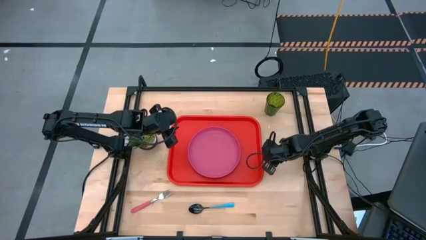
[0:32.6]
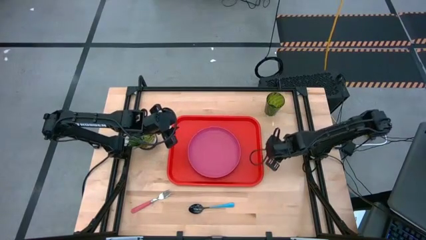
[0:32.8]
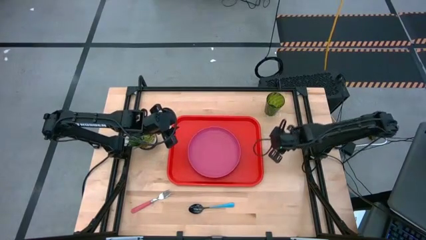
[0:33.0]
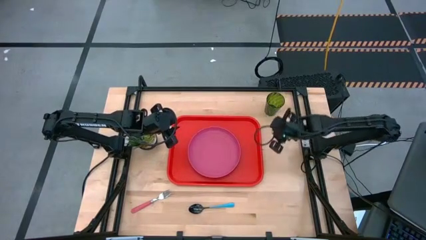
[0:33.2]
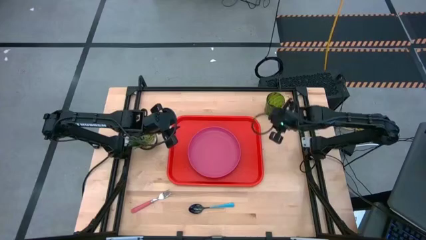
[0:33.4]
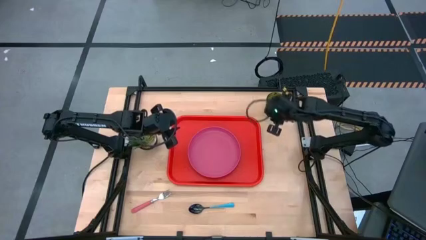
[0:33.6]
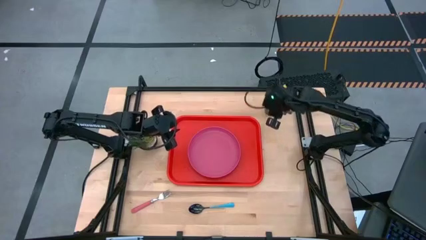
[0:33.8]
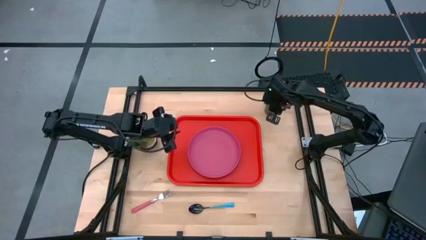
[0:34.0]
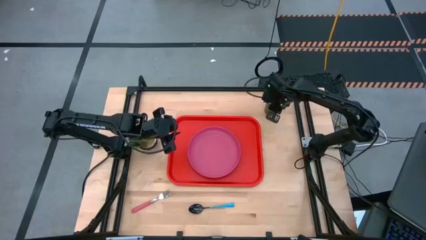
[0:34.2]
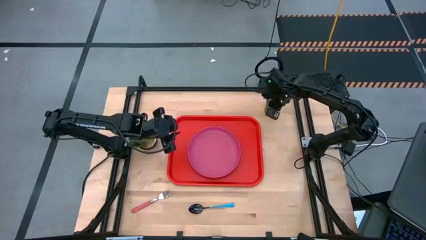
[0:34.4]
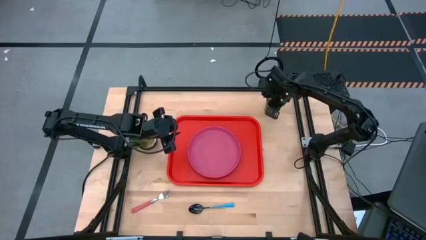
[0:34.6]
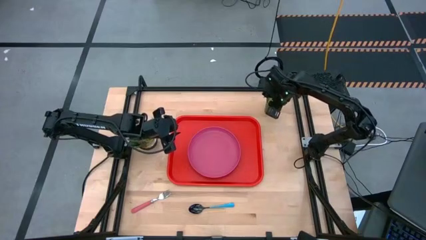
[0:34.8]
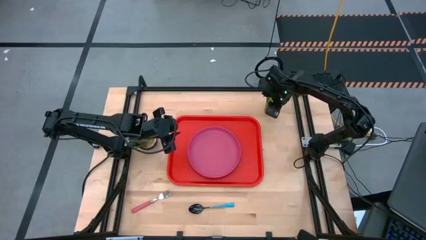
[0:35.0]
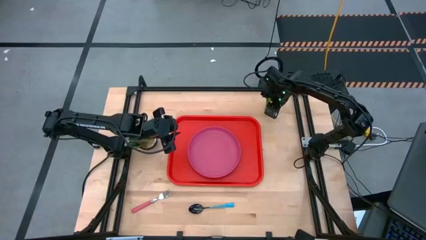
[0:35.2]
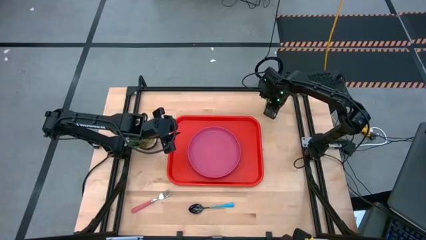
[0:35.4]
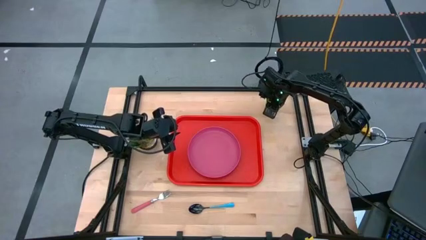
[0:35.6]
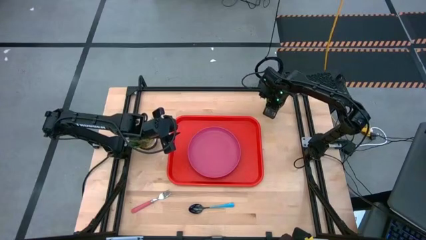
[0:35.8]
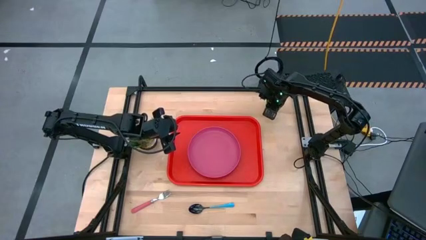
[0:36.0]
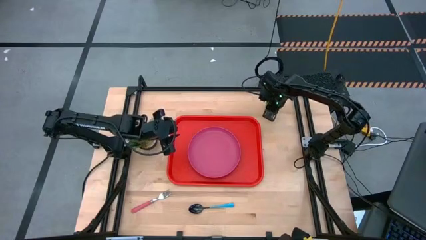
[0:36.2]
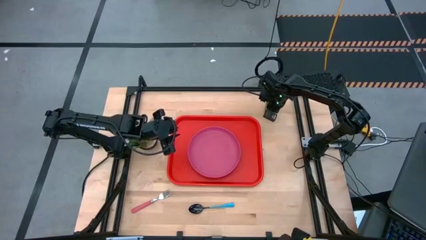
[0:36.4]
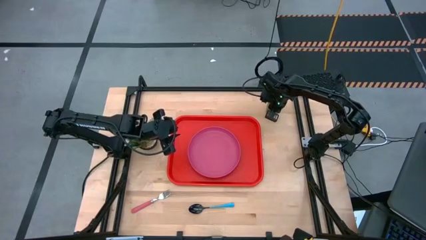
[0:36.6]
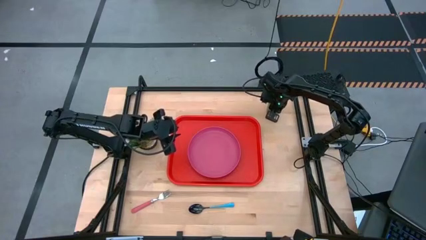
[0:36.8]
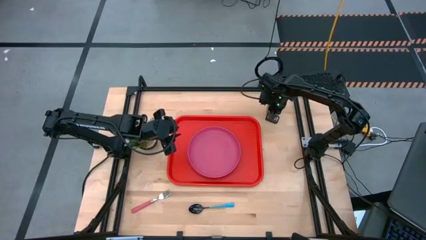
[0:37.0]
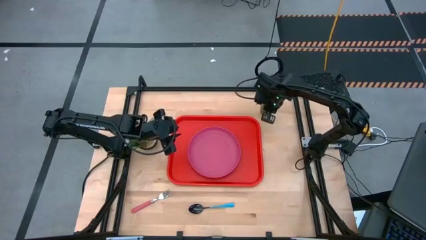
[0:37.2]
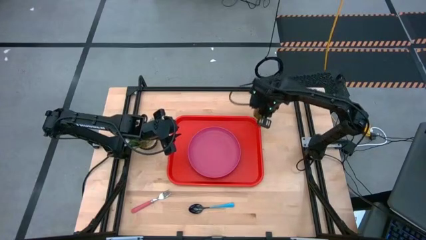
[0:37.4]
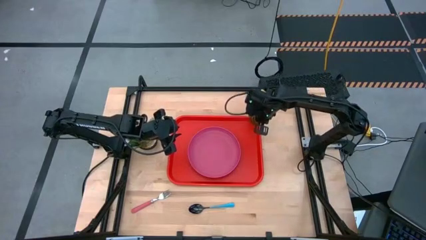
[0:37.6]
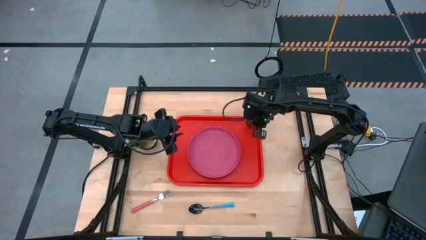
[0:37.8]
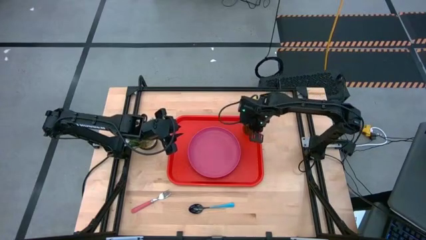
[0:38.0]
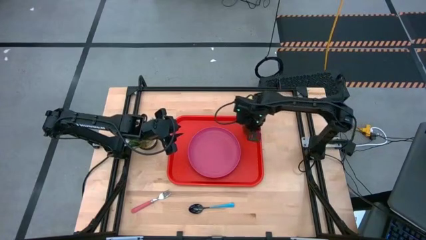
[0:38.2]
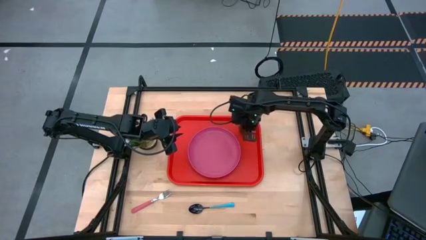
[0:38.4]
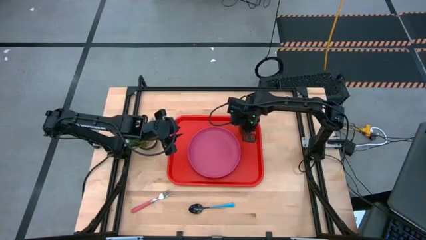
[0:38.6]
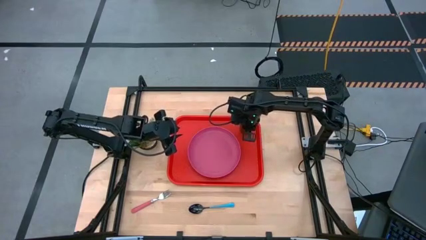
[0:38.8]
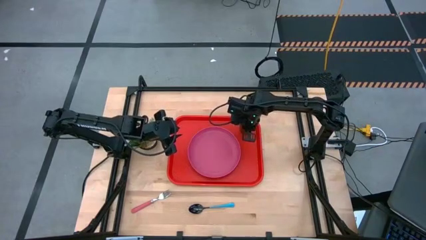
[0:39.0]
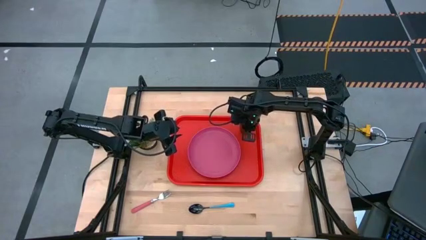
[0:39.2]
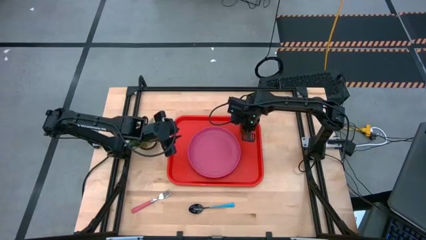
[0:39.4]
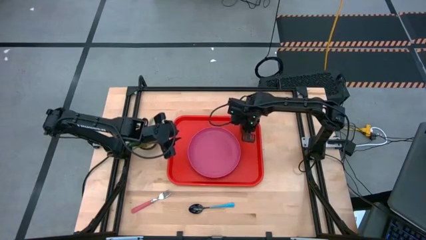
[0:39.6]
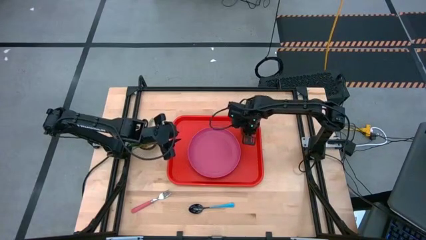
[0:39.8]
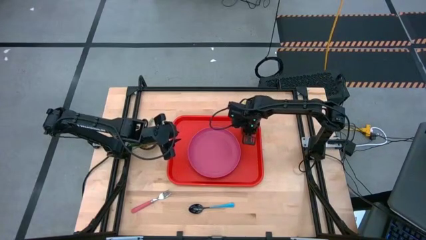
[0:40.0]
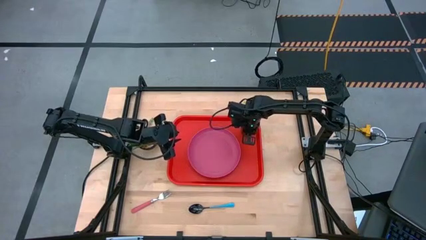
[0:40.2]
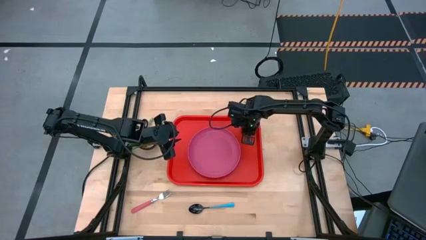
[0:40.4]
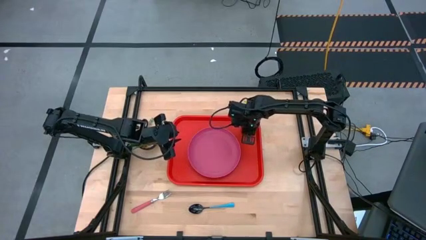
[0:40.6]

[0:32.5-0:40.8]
Task: Pick and place plate/cup/fork/spoon on tray
Put the green glass on the top right of the red tray

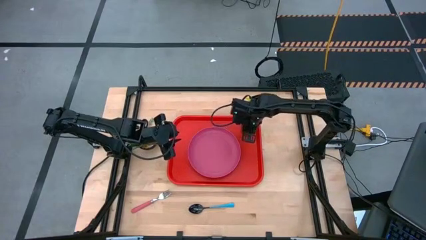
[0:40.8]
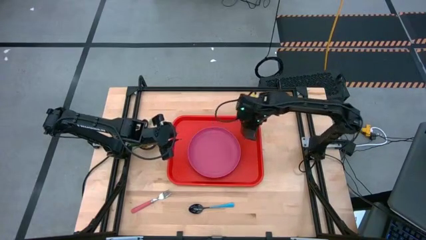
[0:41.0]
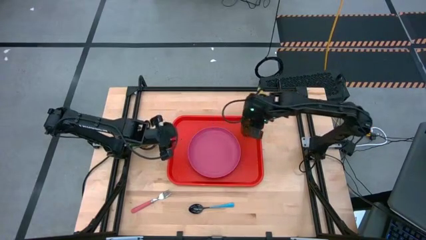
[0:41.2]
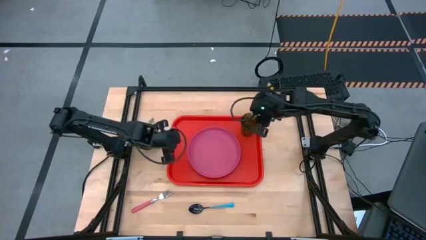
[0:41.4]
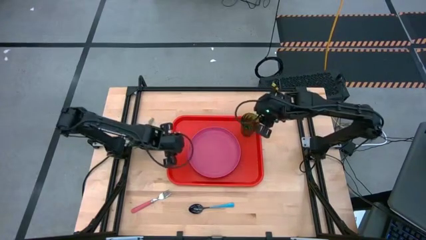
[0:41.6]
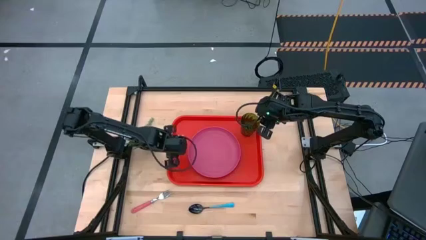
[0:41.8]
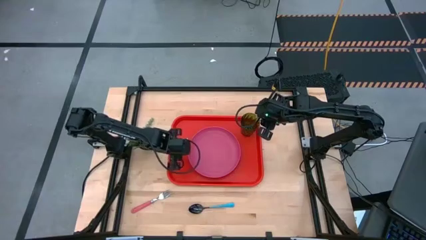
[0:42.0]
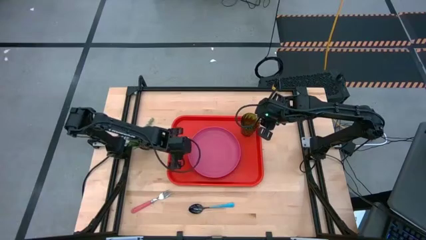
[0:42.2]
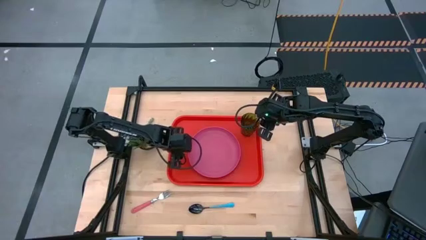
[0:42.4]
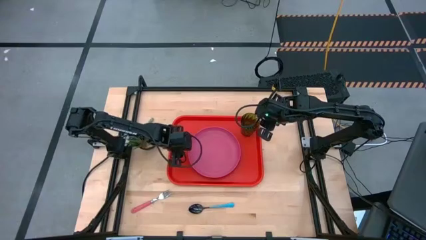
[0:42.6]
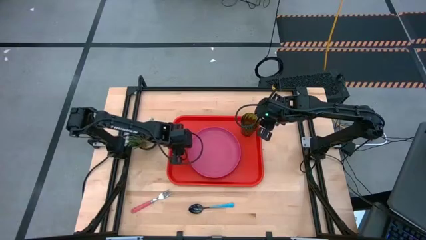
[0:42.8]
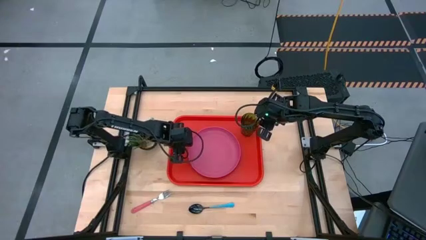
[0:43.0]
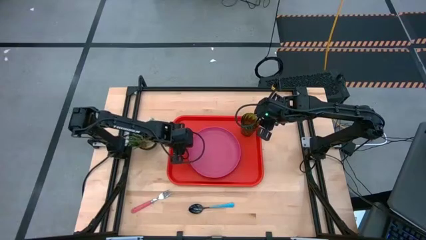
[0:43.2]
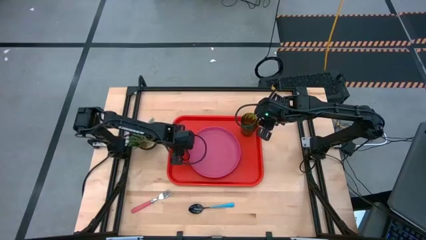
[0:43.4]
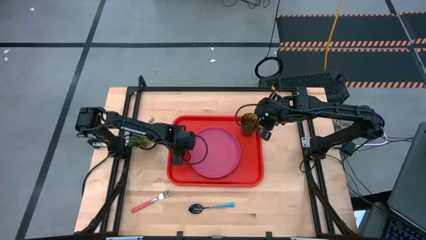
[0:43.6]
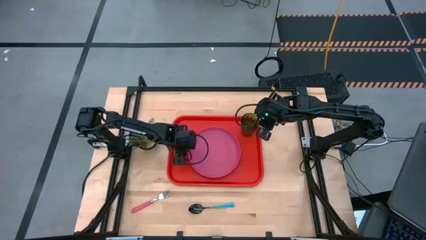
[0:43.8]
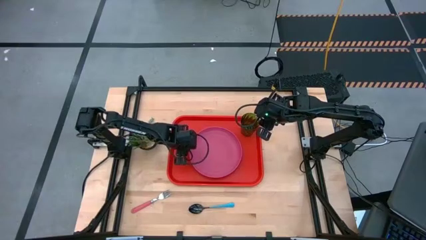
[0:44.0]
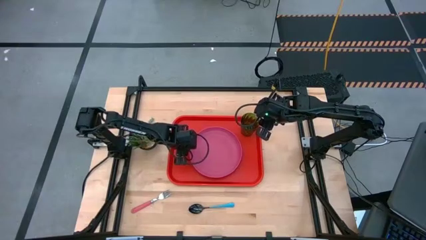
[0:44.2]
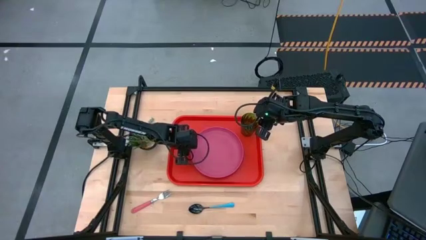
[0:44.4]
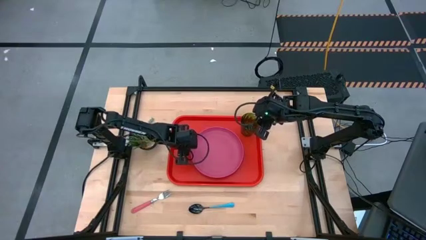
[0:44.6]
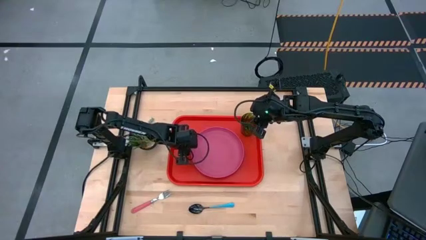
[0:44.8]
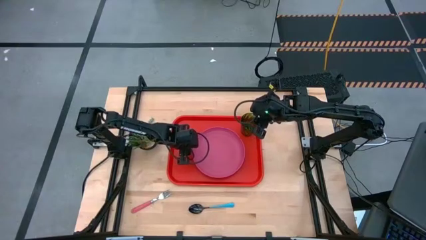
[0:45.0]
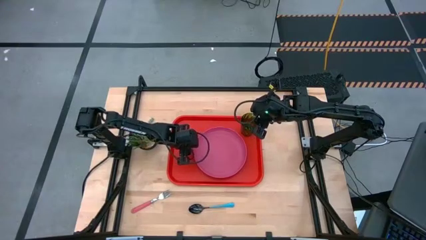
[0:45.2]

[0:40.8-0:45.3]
Adjust the pink plate on the red tray

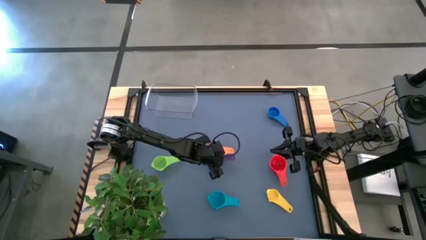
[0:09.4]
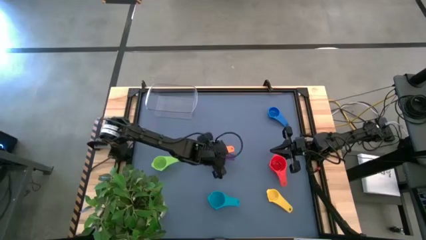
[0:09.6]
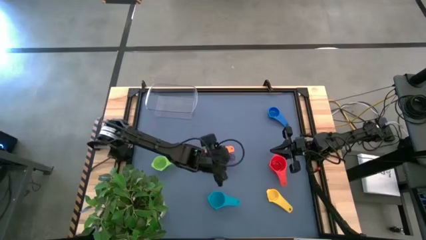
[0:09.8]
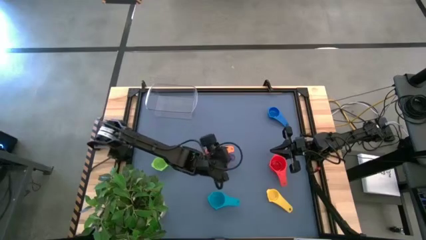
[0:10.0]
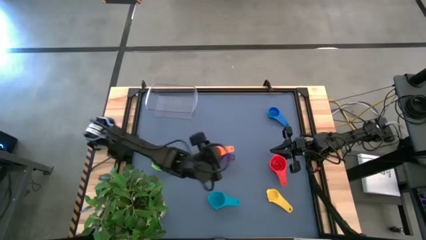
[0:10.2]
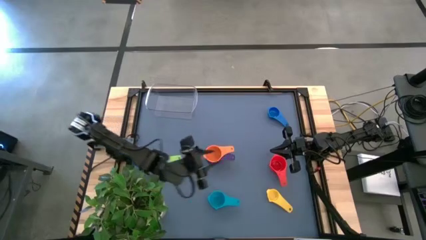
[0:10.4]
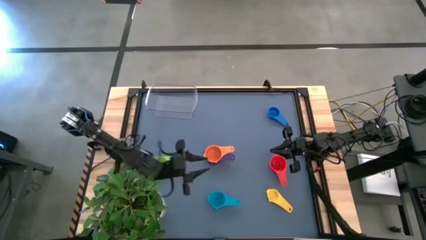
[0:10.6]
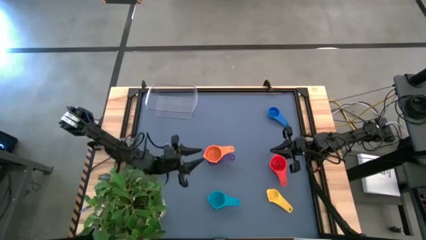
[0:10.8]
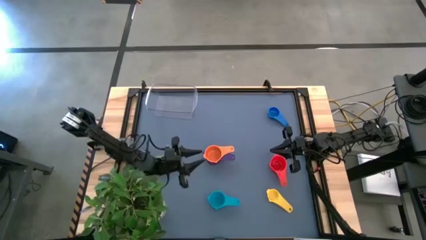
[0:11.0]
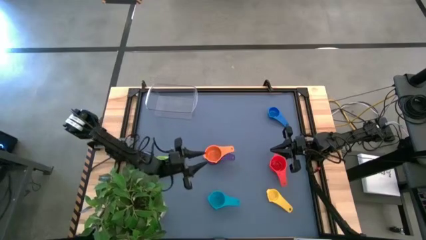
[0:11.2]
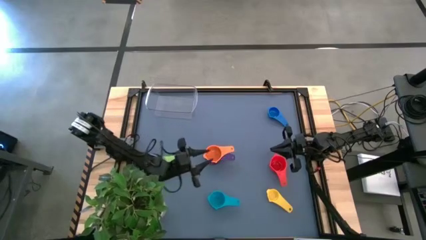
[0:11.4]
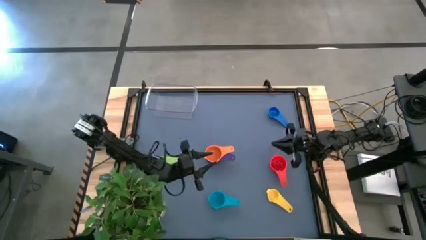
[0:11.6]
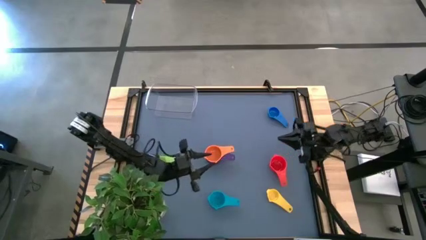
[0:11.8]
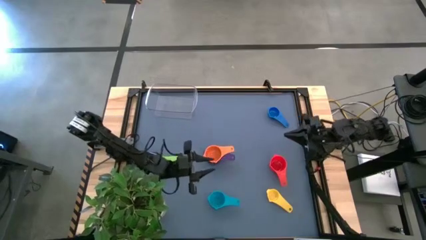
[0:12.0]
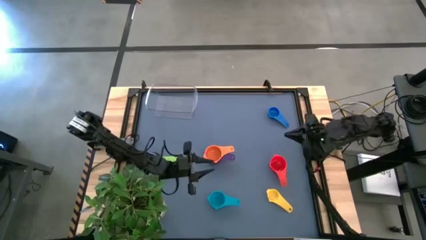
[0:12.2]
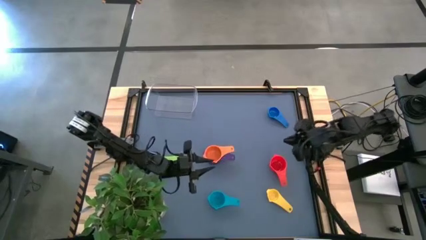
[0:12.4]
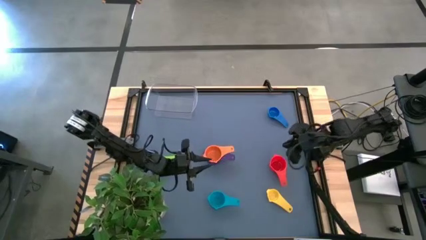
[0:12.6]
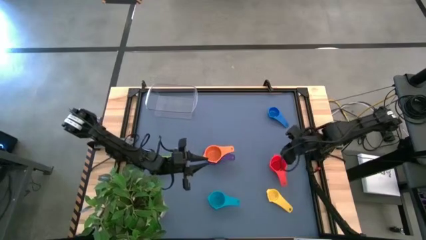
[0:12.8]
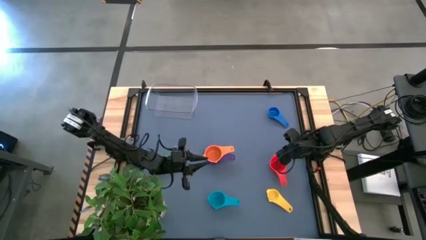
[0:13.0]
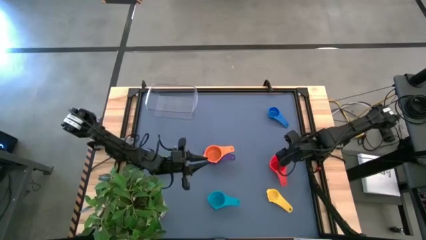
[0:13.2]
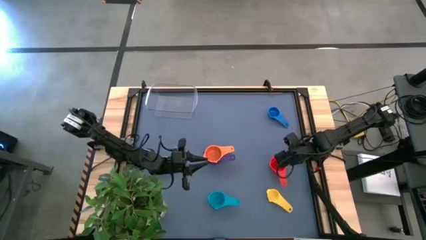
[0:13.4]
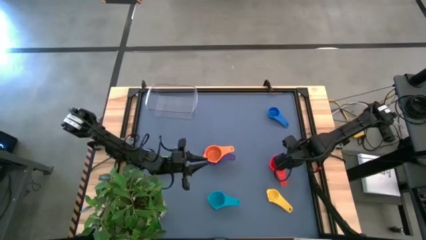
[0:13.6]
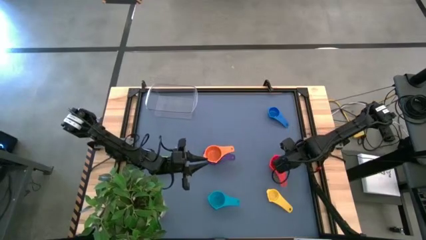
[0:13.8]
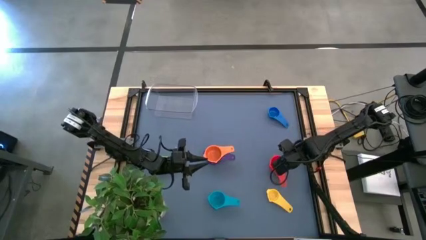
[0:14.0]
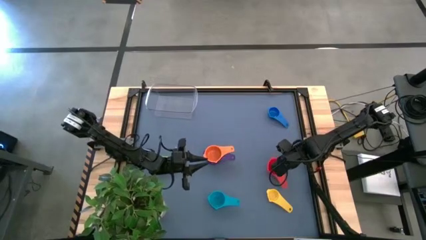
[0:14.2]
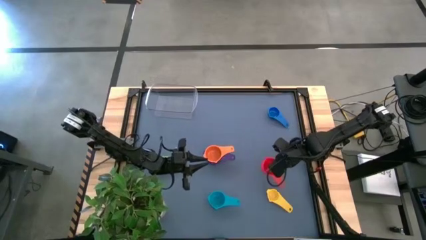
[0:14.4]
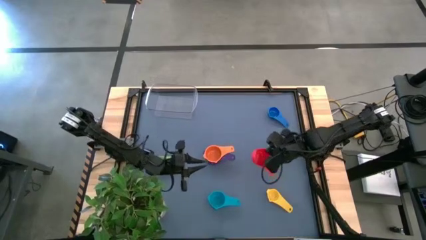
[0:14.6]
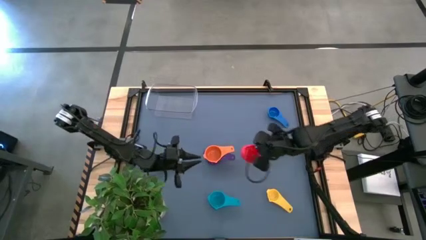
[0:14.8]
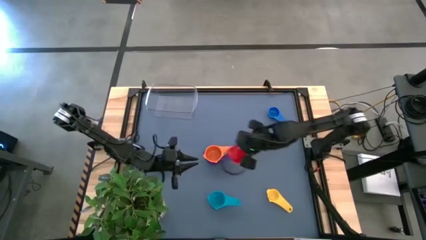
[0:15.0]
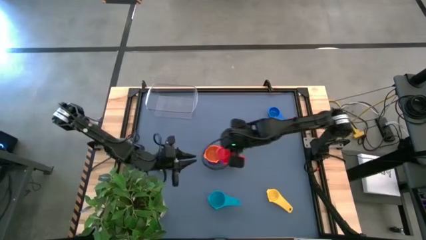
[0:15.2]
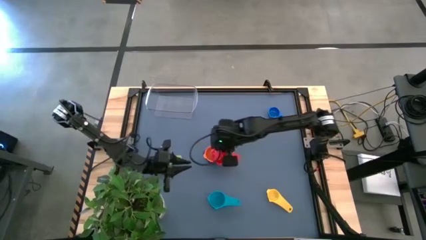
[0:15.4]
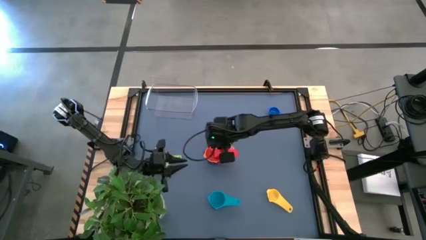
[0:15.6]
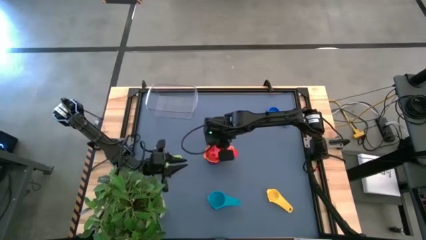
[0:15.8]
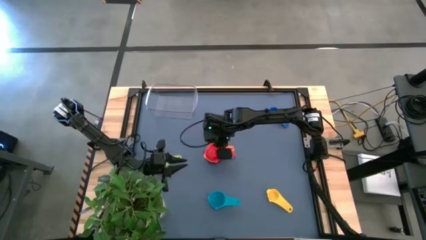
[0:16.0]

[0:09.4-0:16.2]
Task: Nest measuring cups in basket
Stack the red measuring cup on top of the orange measuring cup
